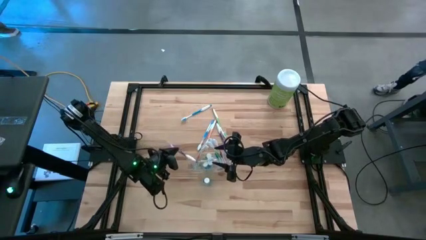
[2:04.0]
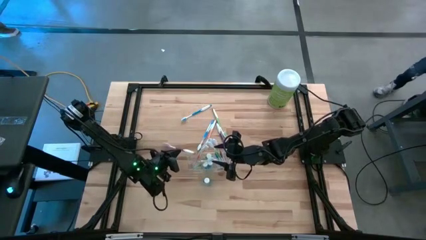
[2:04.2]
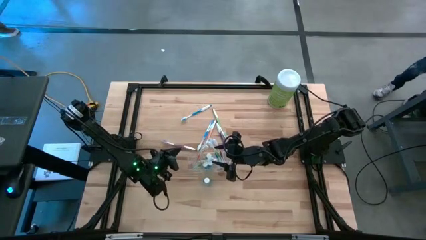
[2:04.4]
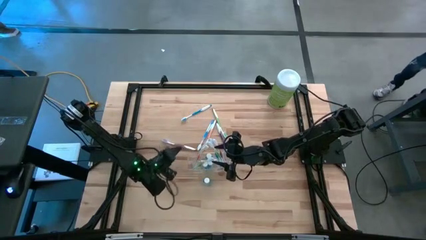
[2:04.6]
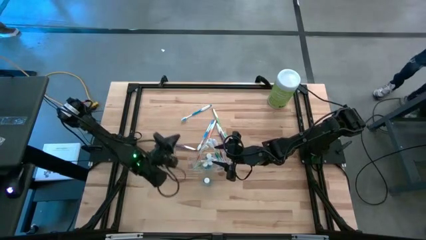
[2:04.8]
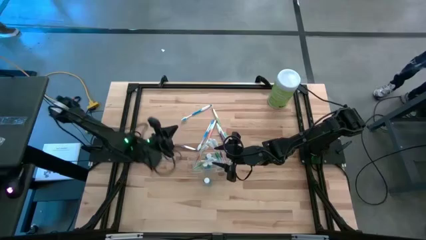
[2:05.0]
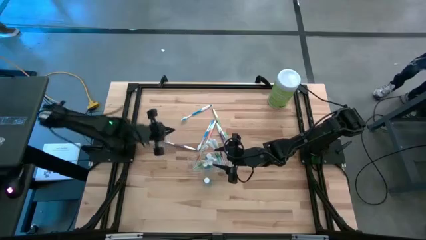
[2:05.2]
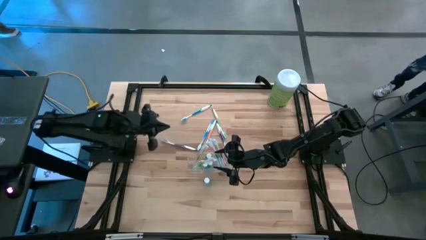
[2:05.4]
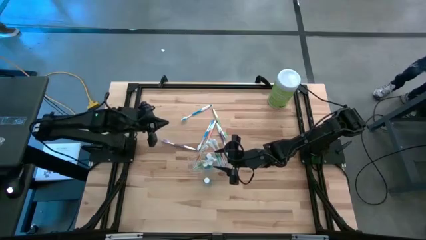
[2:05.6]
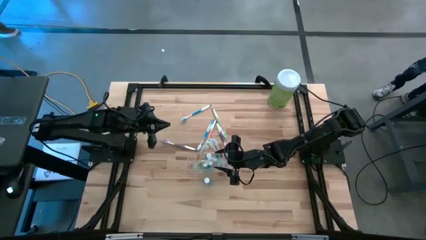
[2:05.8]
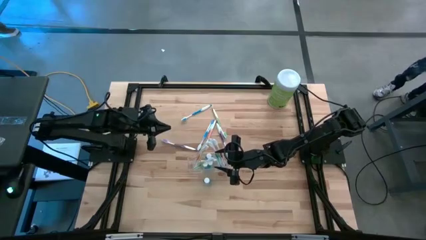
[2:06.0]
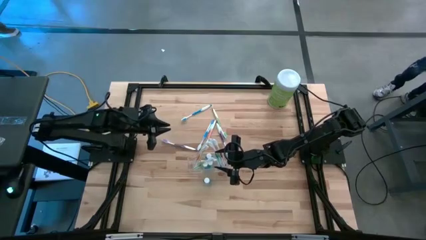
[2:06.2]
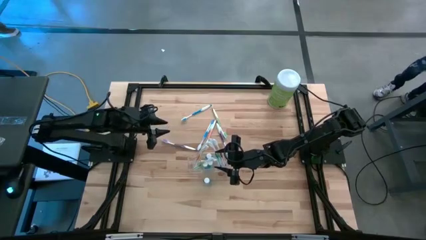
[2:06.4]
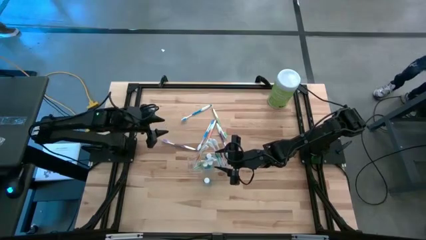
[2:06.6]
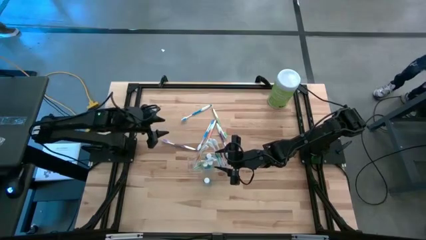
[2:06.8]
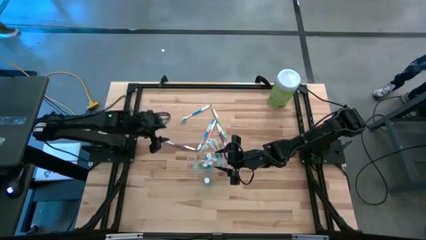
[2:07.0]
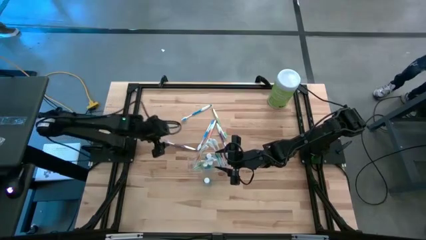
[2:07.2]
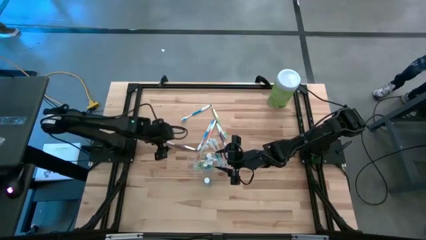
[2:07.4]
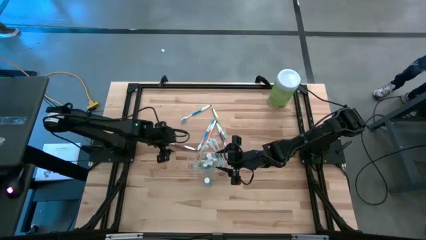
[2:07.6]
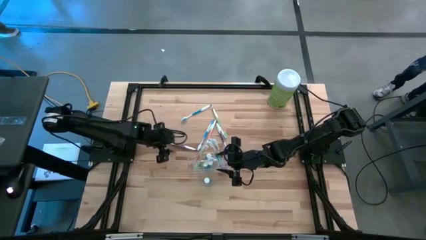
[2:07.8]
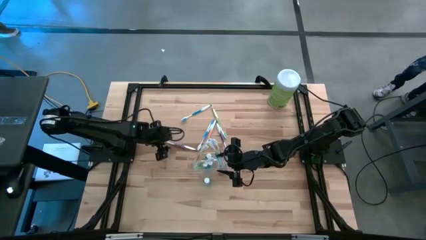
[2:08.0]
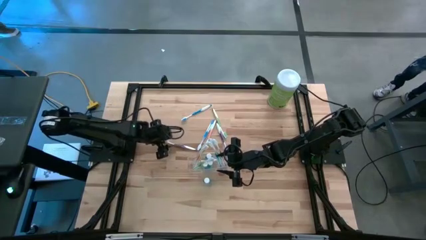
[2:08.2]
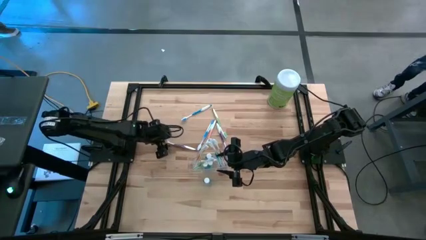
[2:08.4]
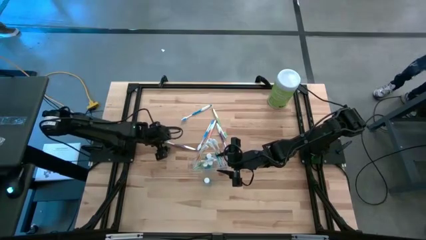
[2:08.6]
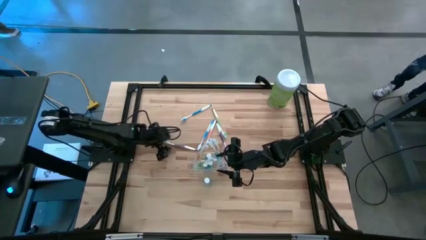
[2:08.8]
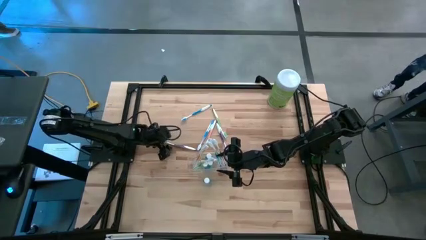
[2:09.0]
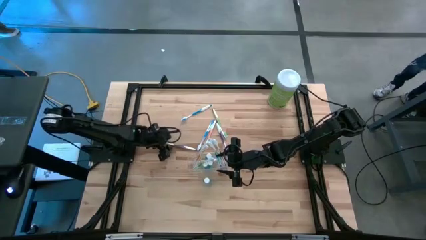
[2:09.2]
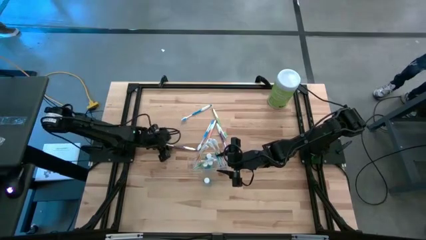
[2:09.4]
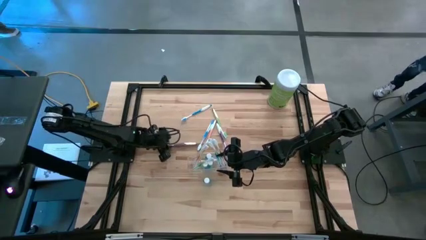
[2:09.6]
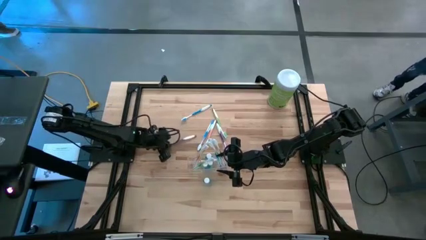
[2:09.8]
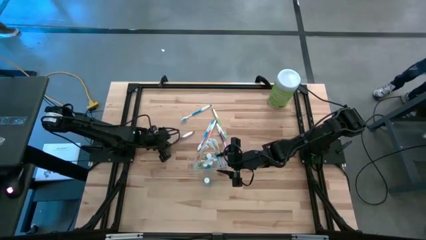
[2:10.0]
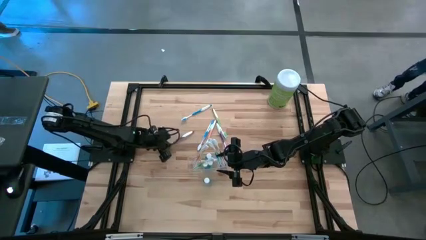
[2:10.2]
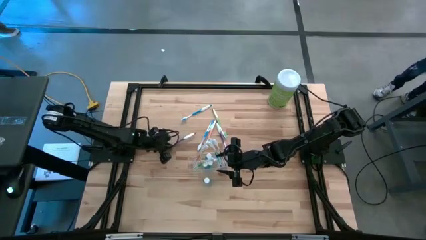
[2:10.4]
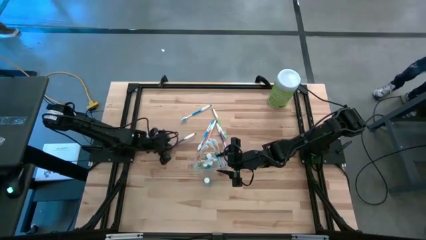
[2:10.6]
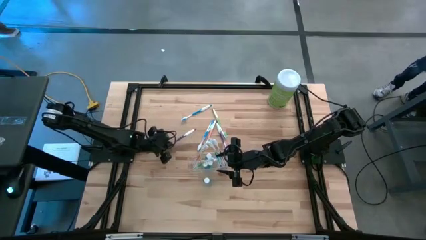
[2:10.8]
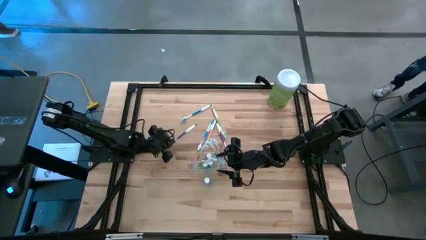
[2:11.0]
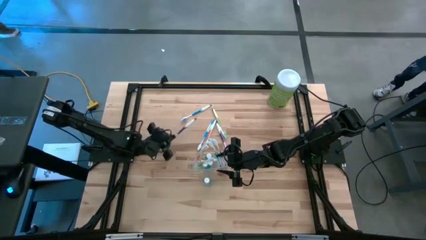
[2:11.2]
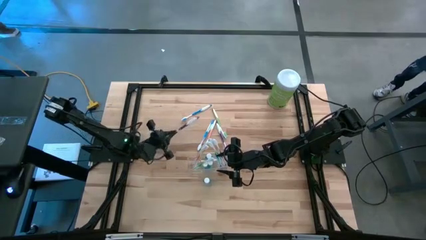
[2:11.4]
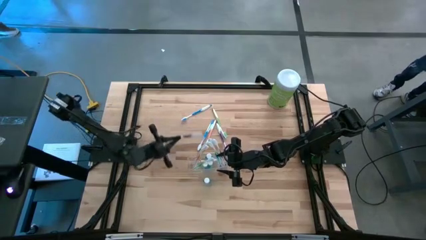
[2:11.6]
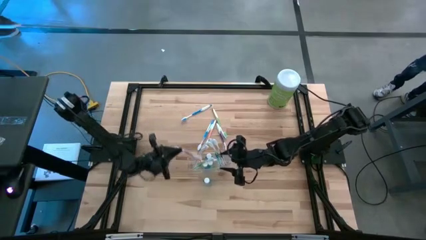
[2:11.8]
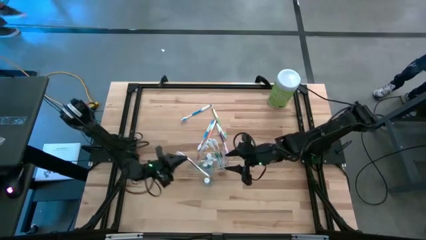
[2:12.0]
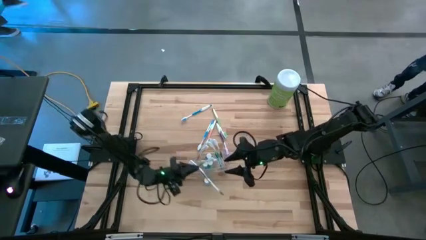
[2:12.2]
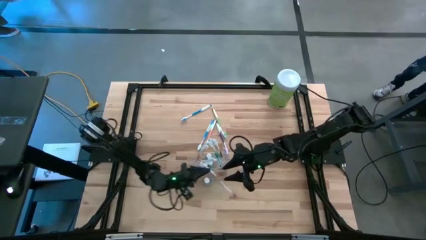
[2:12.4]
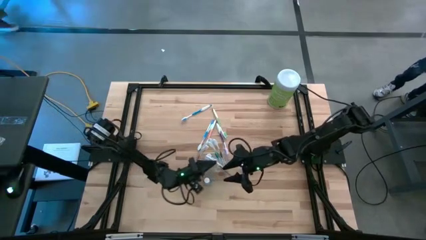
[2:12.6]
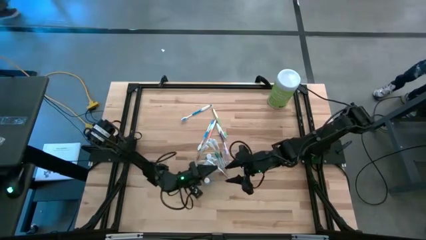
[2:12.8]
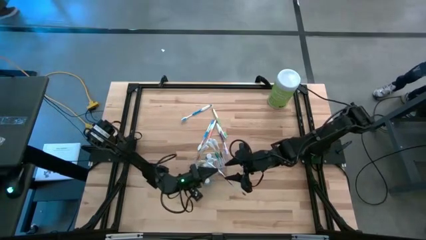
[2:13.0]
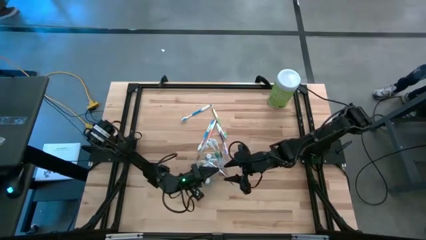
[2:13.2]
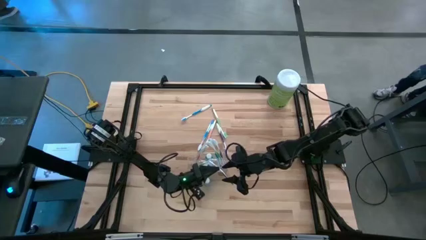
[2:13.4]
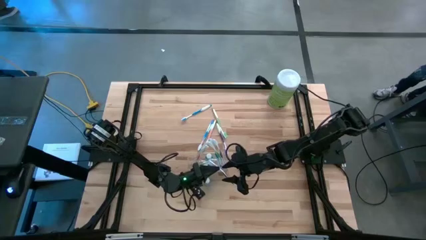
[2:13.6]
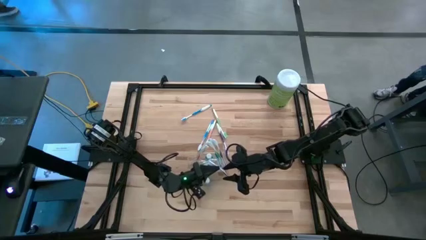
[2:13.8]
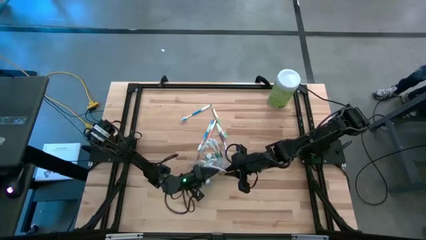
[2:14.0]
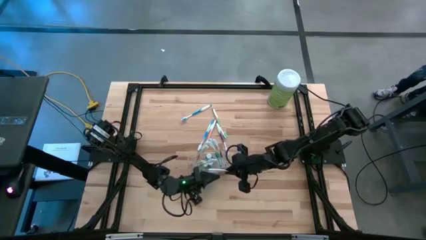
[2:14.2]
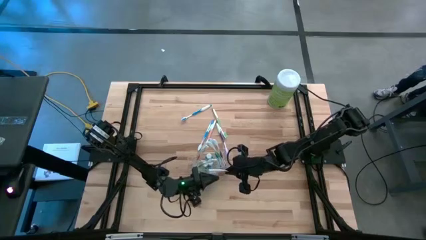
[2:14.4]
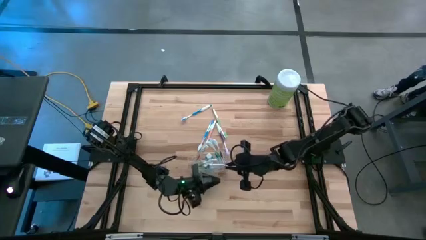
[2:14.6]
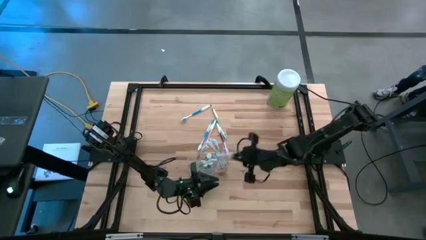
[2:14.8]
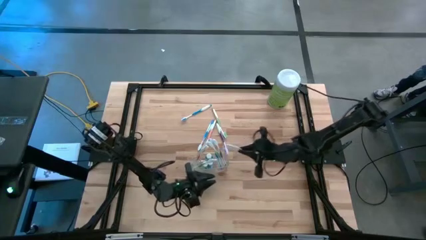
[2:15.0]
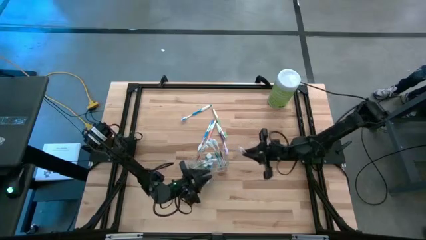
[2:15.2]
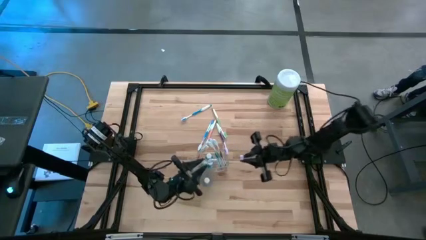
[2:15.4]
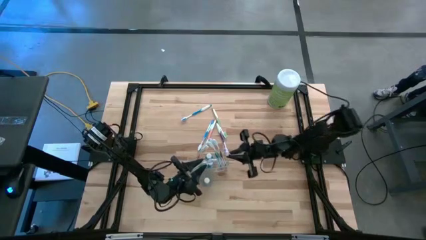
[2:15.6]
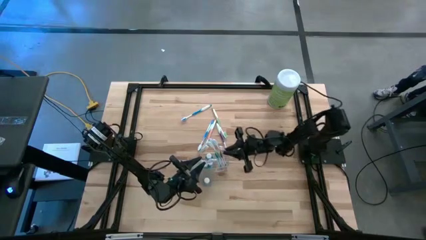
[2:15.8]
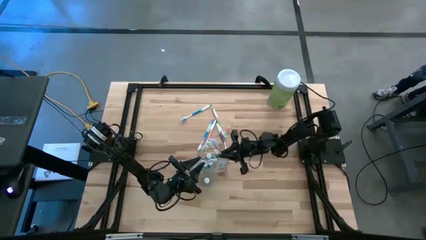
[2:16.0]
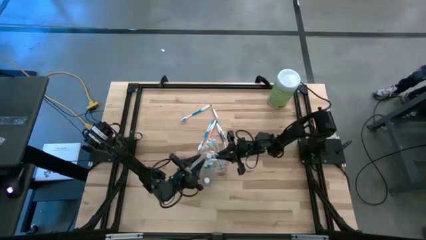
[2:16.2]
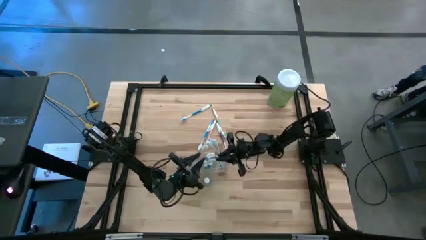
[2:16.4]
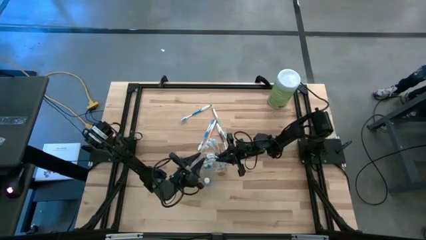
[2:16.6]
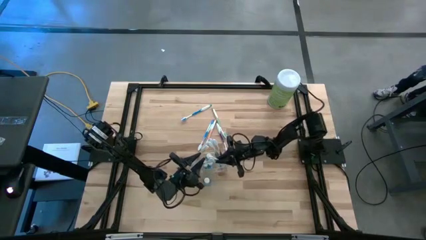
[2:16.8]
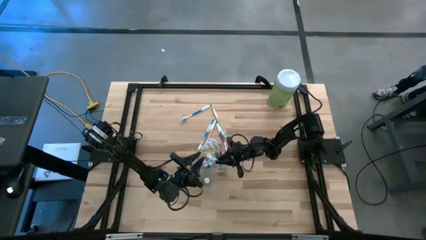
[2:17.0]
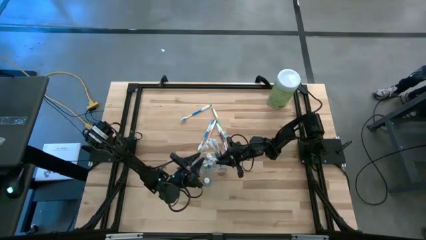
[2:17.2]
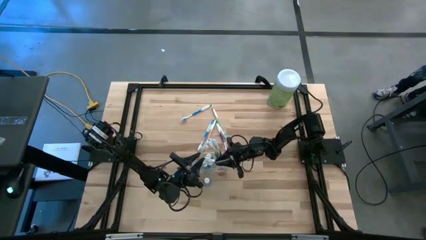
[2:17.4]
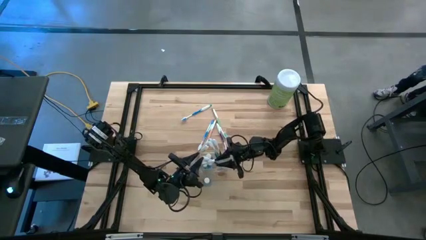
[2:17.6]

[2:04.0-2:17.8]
Task: Pick & Place toothbrushing station
Put the violet toothbrush into the transparent organizer

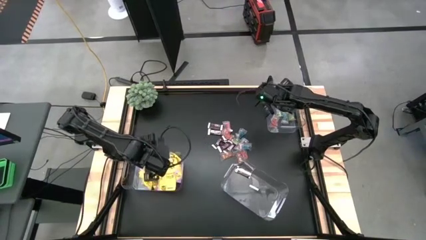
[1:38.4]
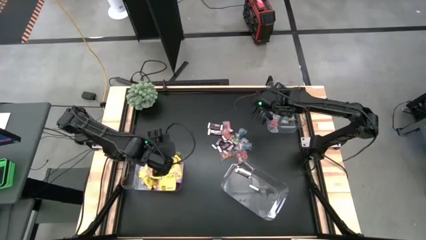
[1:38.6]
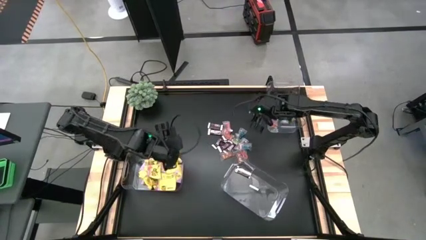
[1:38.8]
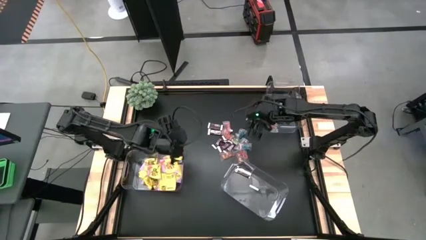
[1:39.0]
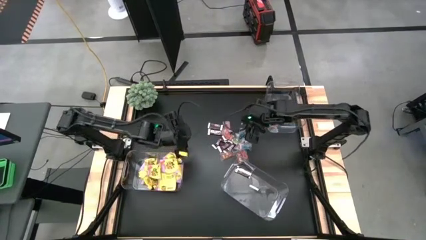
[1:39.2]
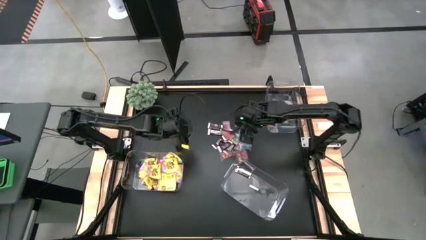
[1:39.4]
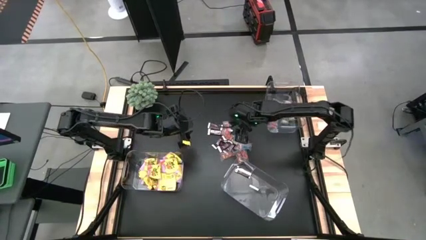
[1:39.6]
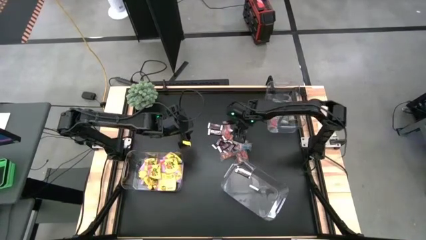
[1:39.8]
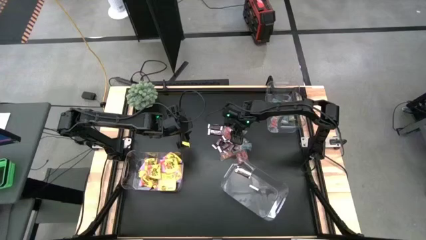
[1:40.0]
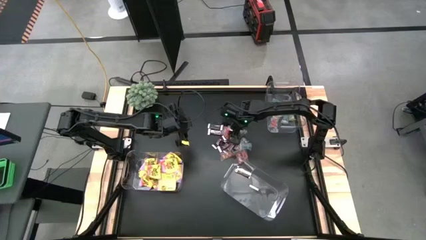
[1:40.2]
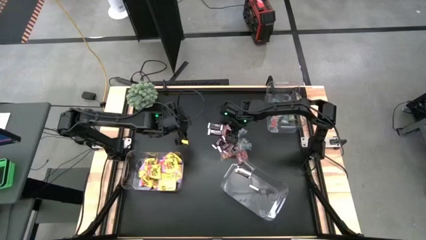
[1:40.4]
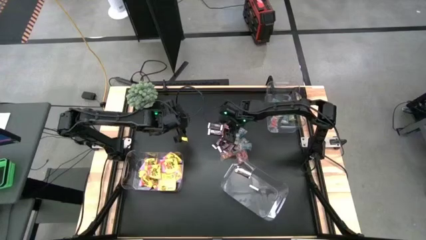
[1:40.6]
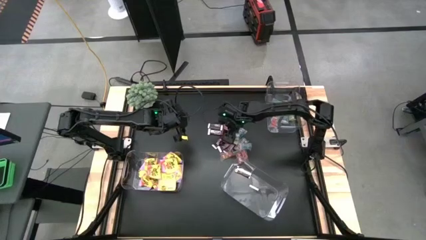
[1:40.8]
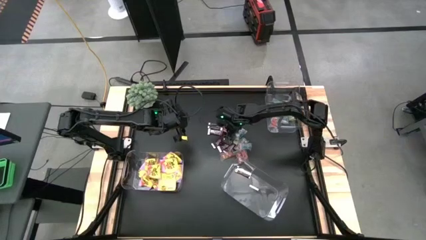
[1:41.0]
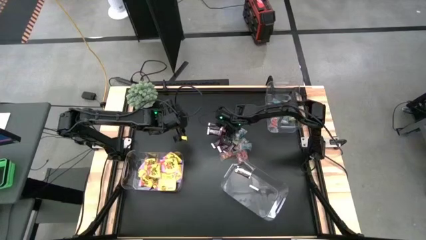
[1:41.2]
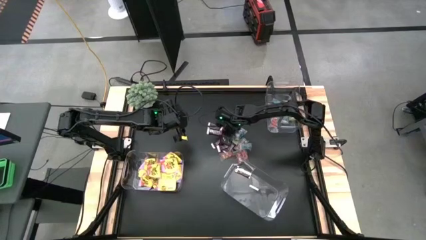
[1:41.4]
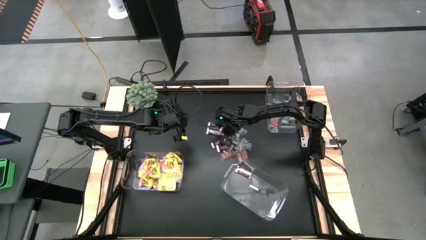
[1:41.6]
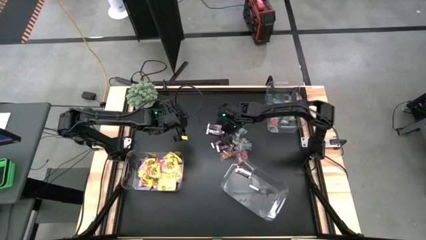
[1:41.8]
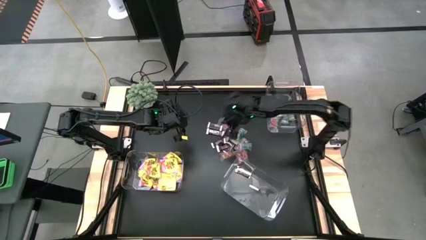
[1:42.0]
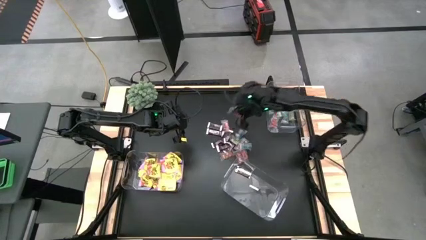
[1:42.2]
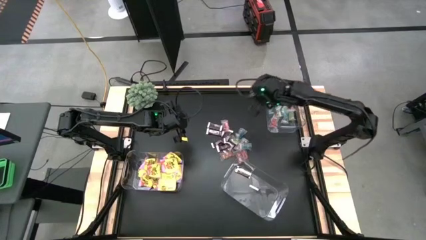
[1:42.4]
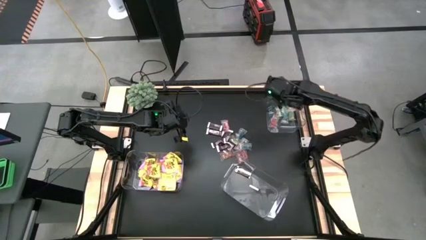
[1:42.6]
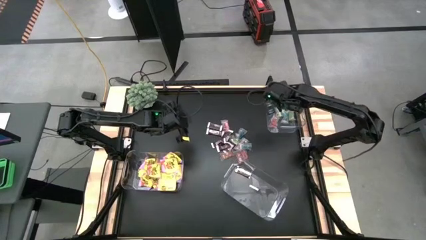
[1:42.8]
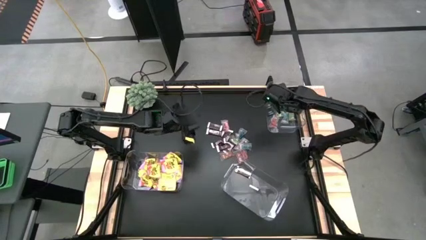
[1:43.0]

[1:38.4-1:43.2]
Task: Sort candy
Put the red candy in the top right transparent container
